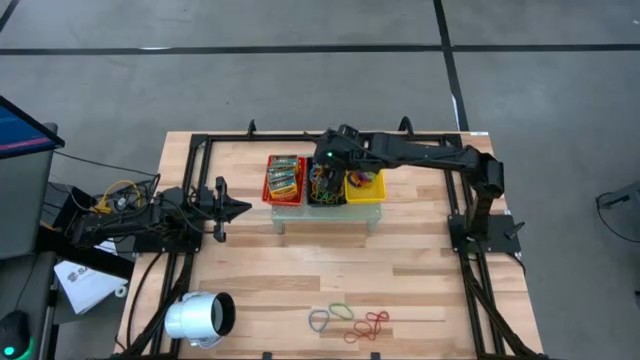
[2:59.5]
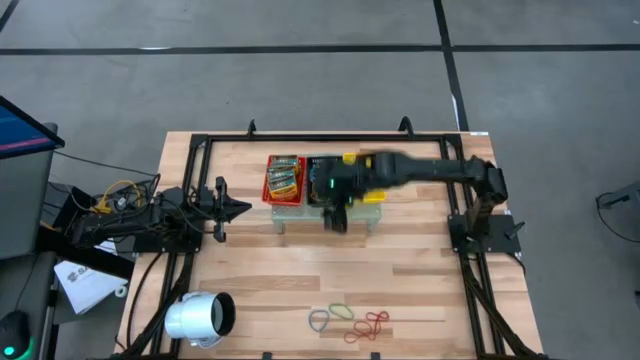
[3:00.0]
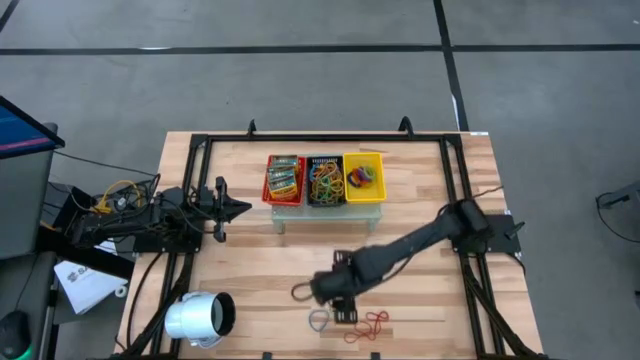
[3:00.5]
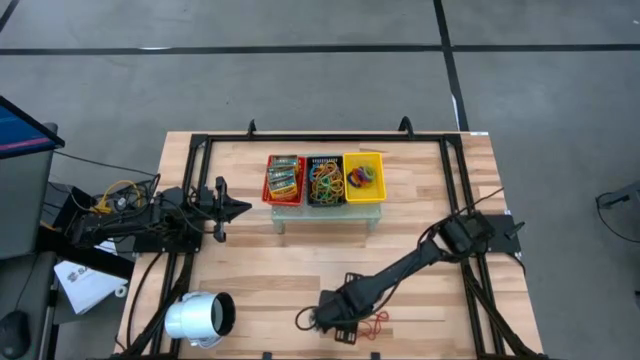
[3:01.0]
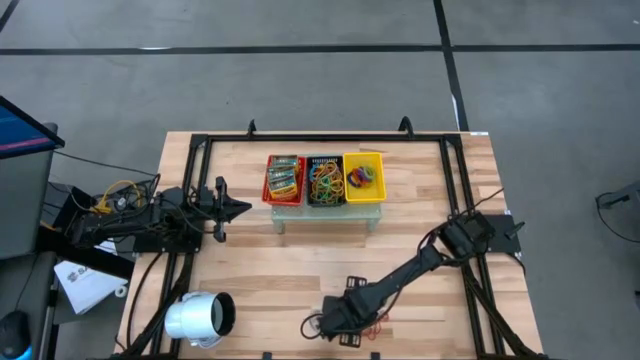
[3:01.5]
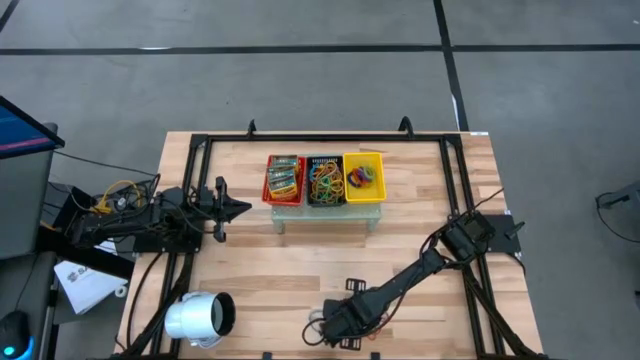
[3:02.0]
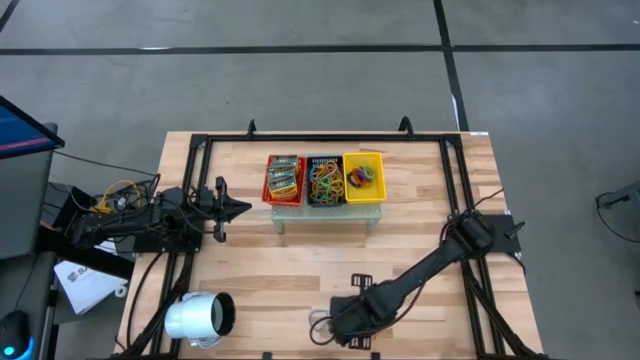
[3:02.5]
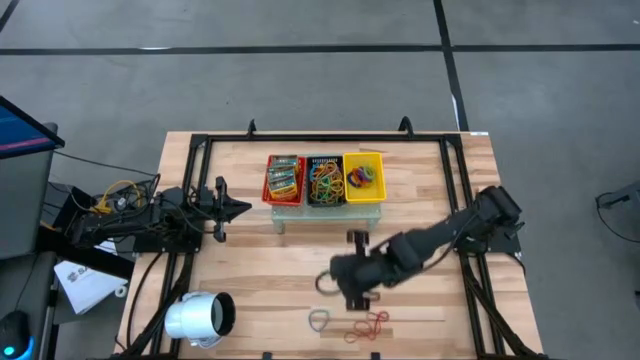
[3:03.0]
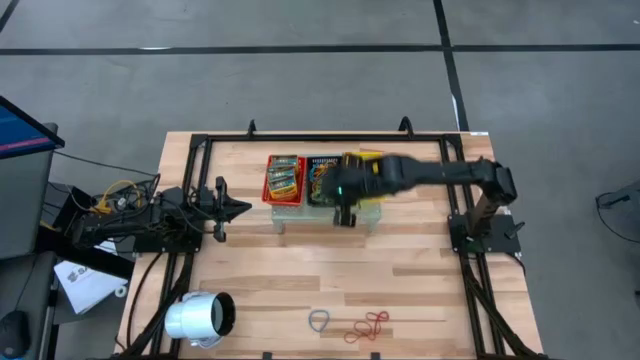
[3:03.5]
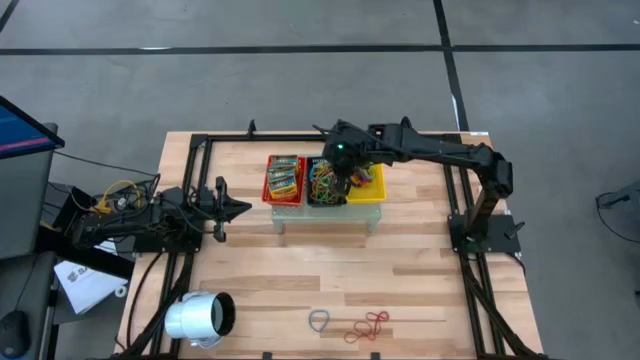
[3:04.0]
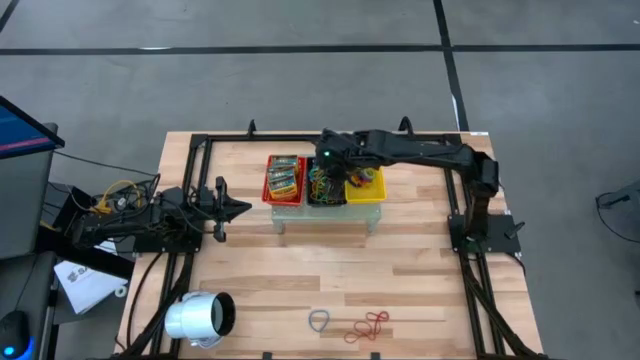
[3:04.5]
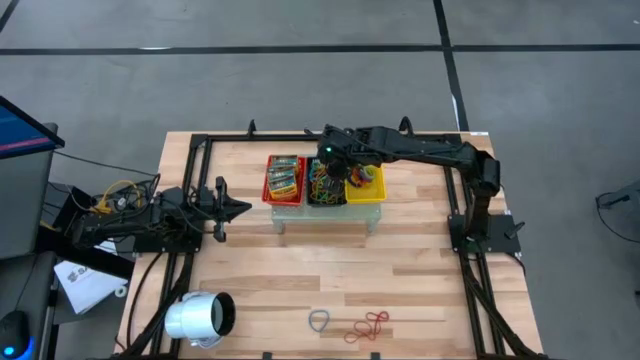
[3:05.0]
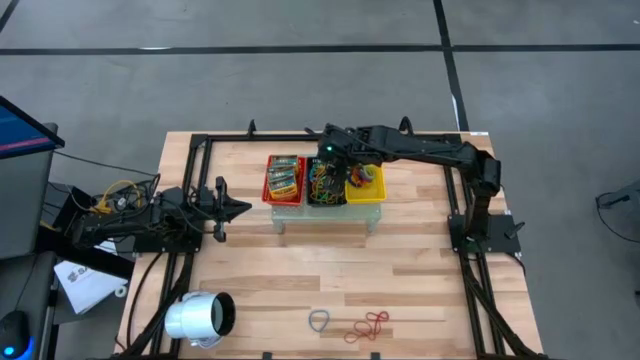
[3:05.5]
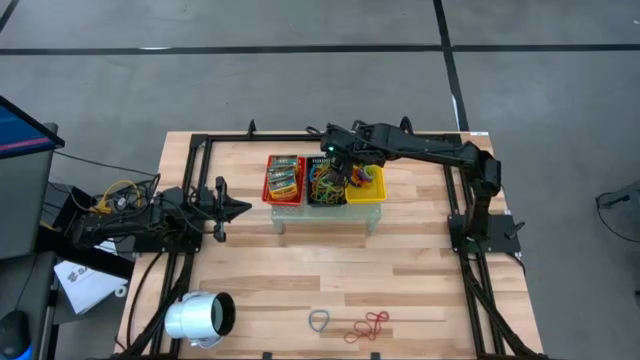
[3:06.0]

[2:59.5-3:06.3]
Task: Pick & Place Office Desk Supplies
Put the green rubber band into the black bin on the shelf

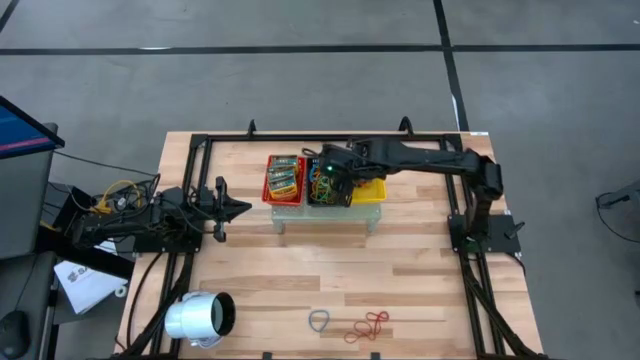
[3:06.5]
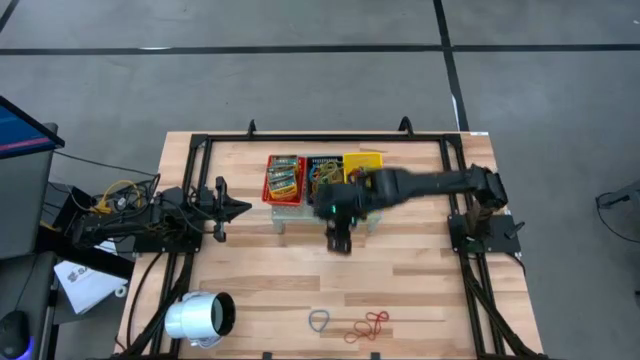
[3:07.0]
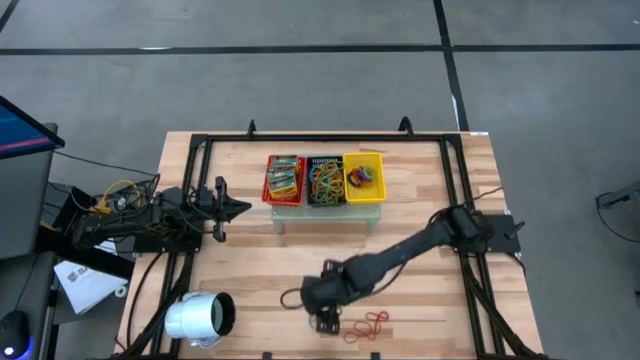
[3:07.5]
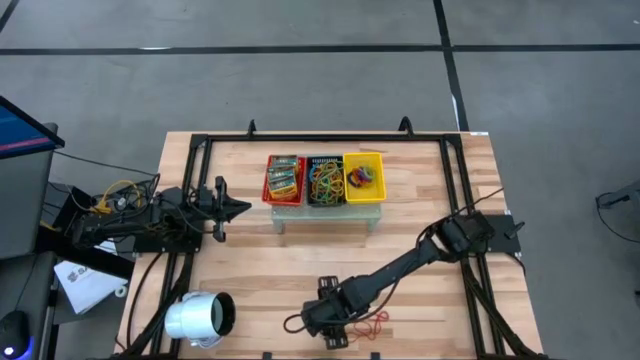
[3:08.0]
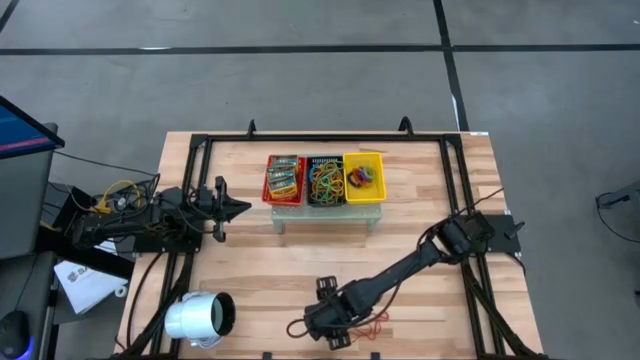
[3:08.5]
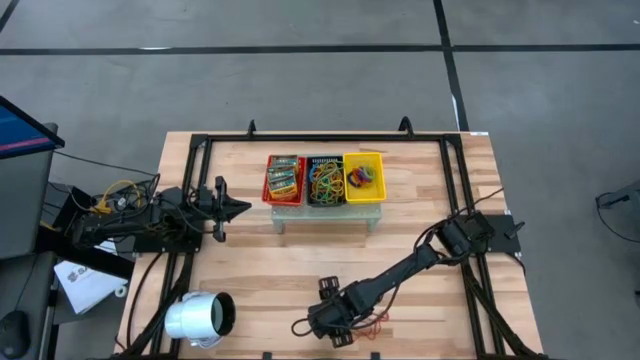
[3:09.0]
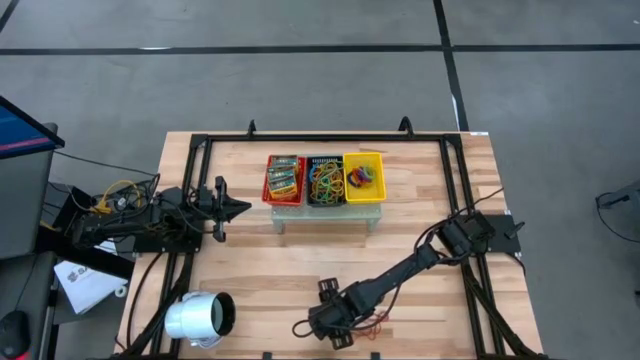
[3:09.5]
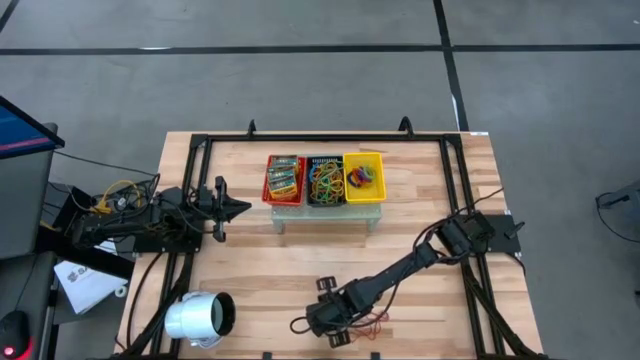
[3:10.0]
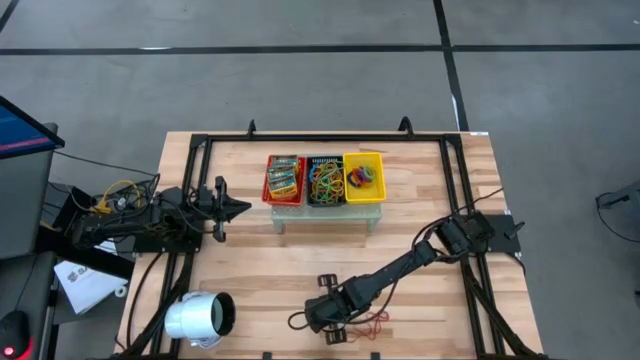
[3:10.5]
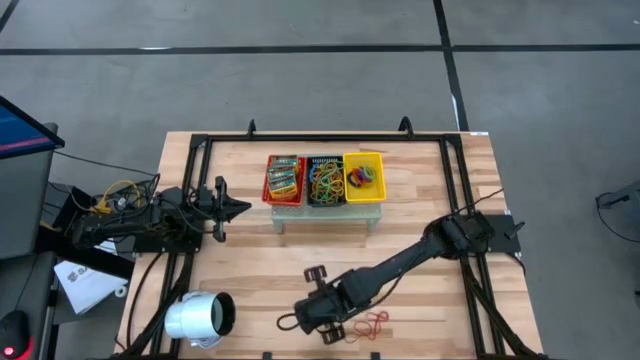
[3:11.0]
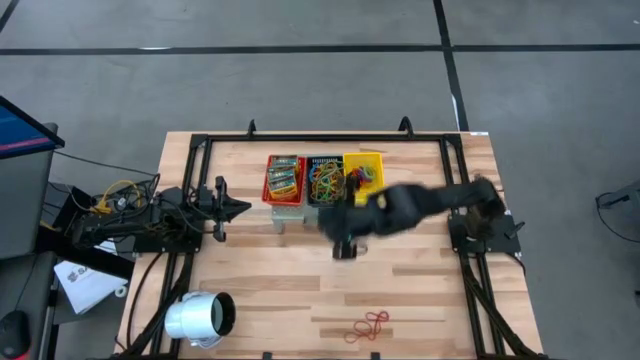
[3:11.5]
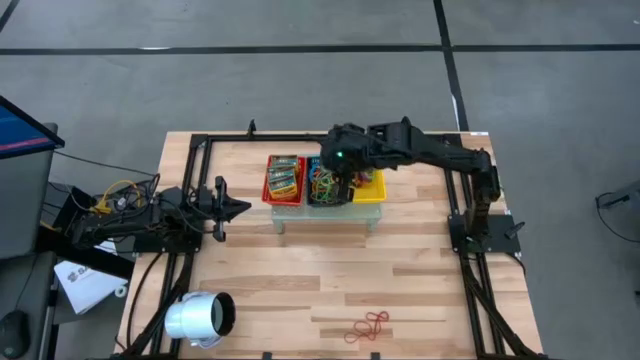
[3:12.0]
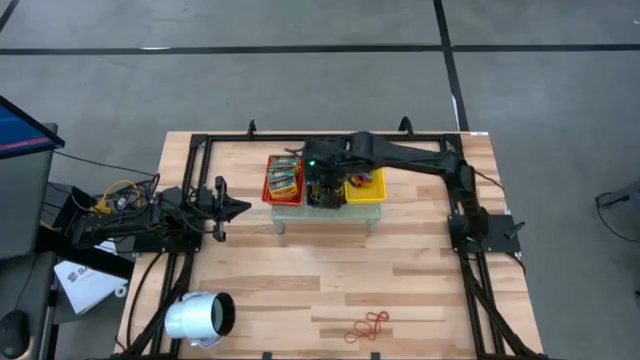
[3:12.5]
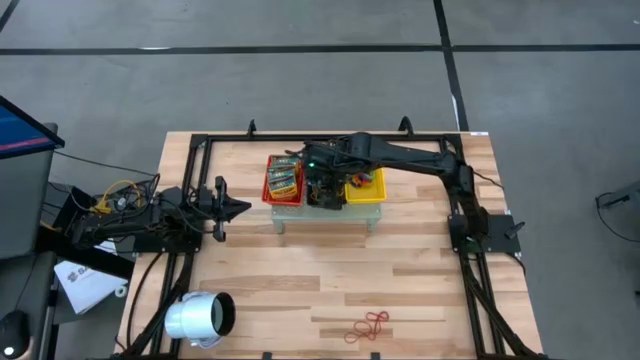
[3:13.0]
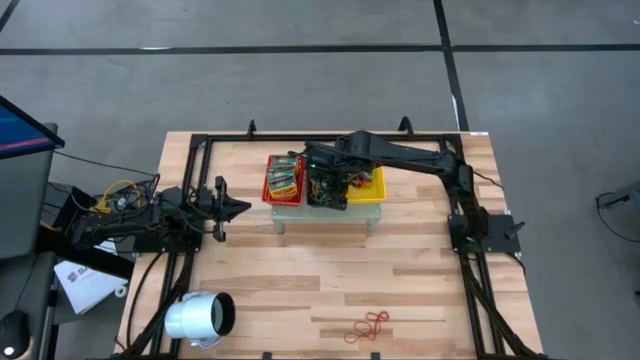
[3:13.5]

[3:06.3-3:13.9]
Put the blue rubber band into the black bin on the shelf

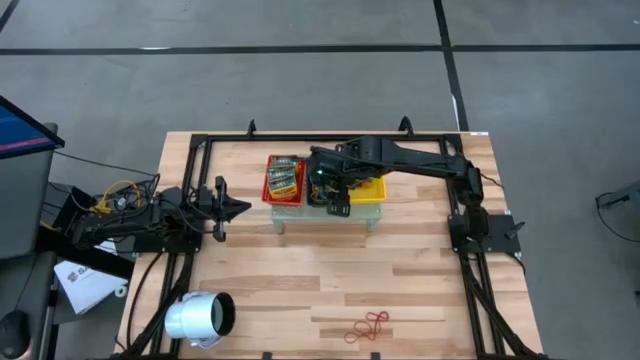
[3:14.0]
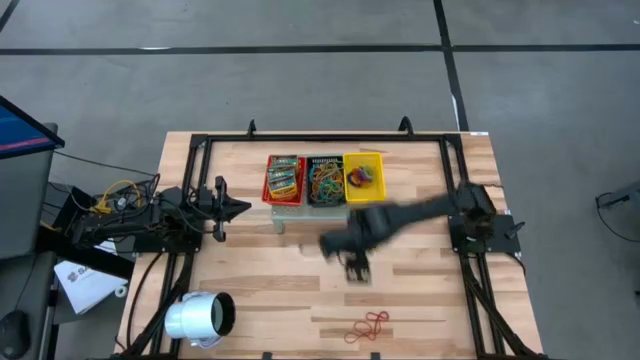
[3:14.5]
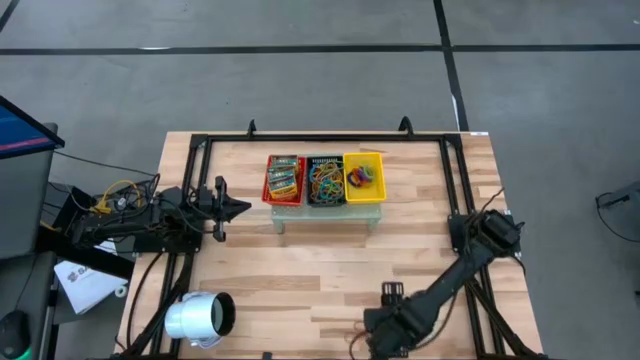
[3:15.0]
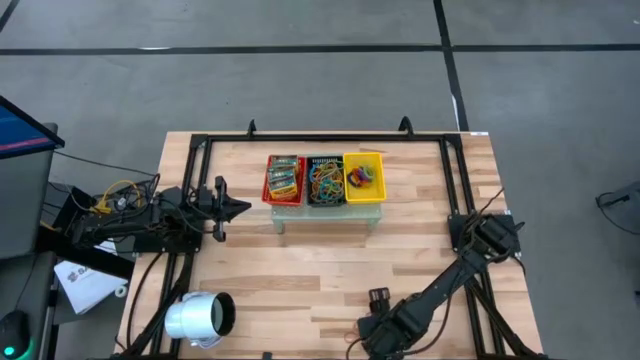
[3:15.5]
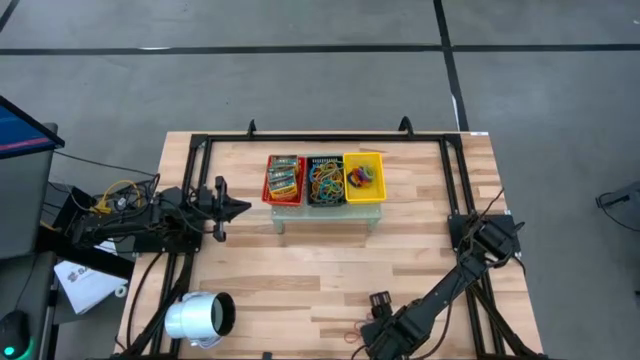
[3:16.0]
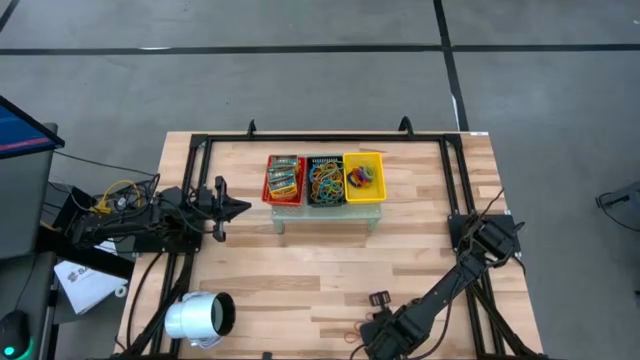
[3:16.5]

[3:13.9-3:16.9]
Put the red rubber band into the black bin on the shelf

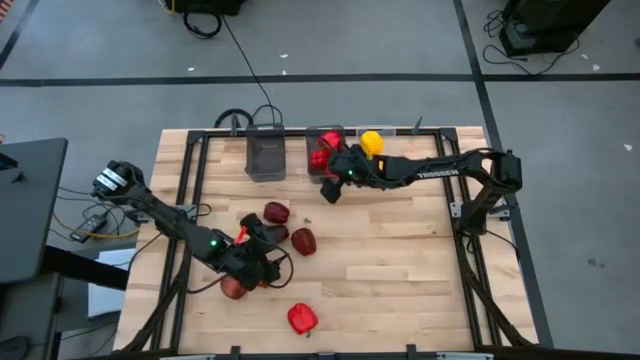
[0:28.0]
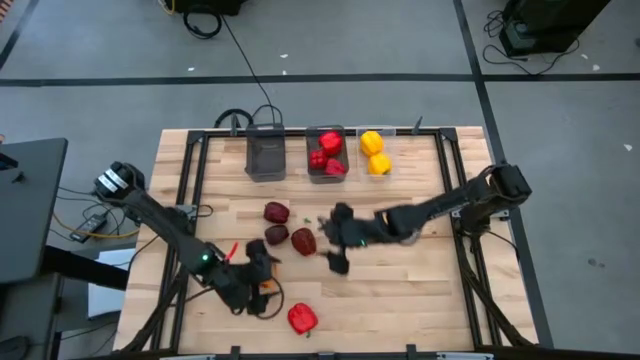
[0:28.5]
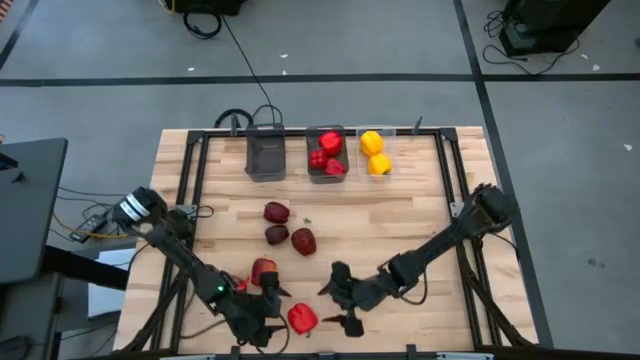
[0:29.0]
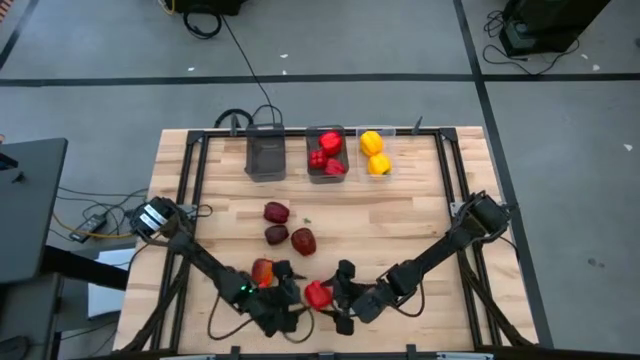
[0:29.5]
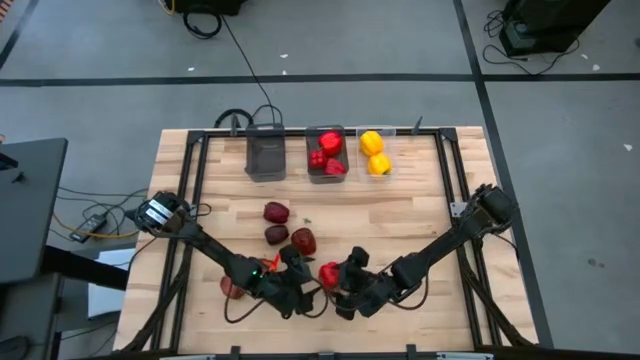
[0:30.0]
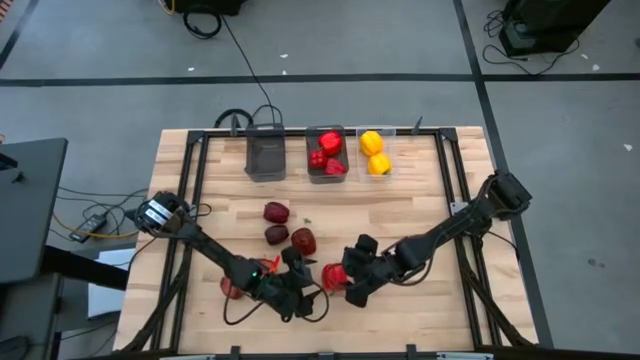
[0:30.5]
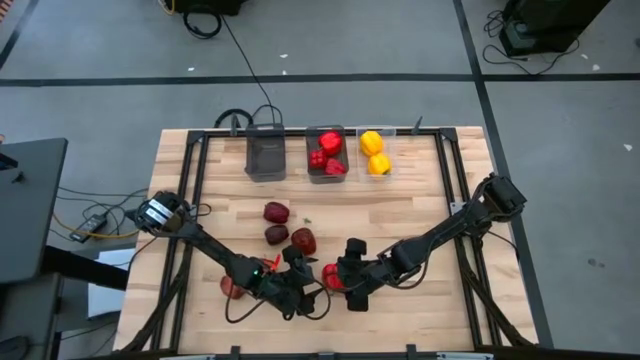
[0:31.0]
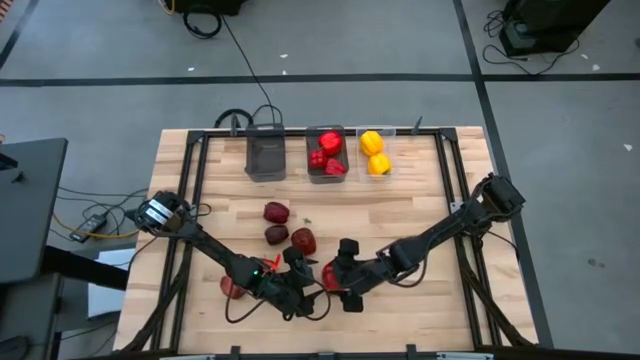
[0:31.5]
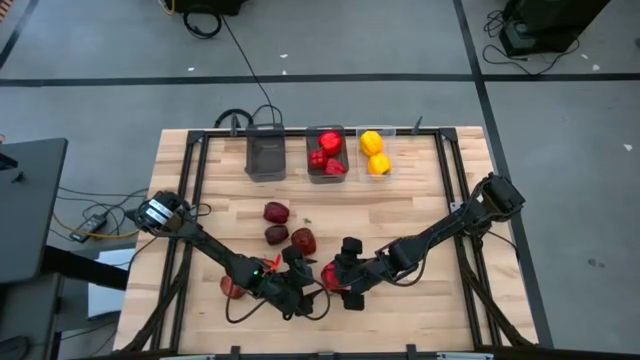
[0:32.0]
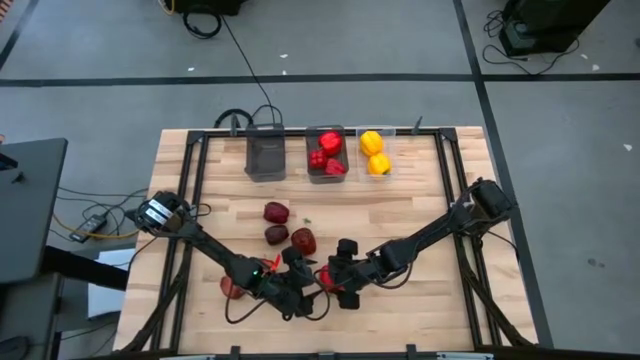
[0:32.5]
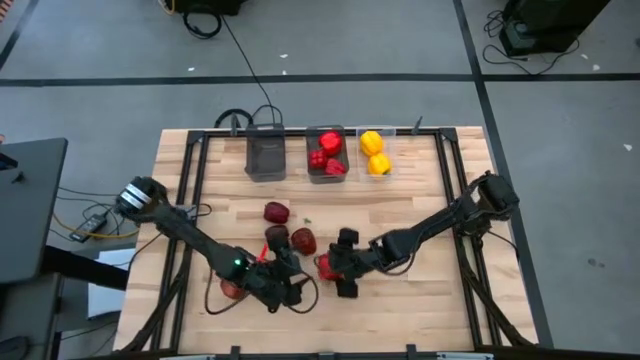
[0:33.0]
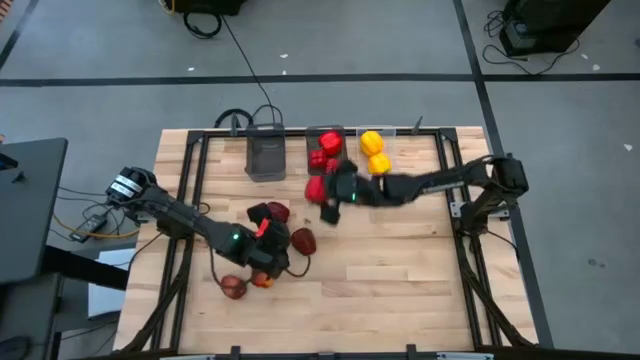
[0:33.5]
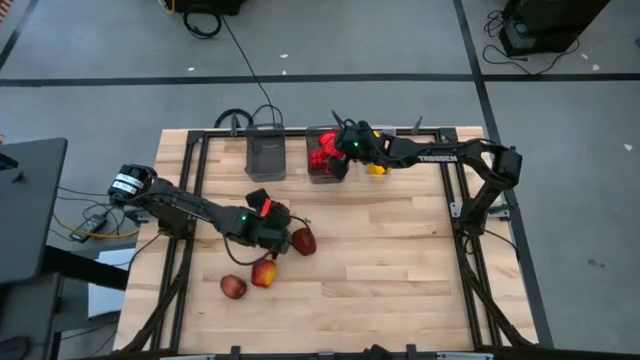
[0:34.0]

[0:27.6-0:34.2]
Task: Sort produce into baskets
Put the red bell pepper into the right black bin
